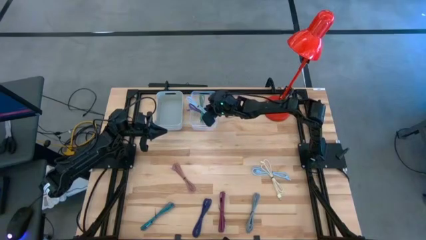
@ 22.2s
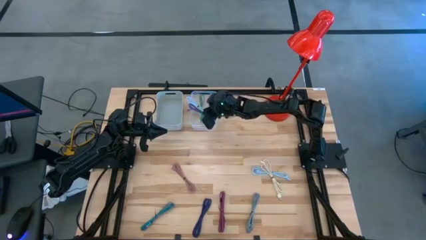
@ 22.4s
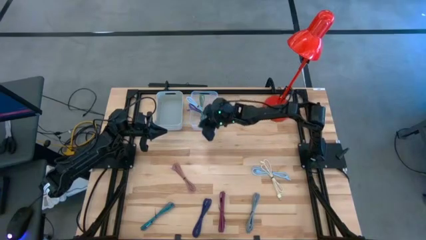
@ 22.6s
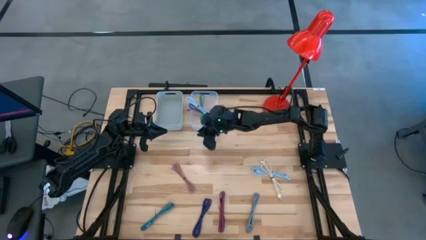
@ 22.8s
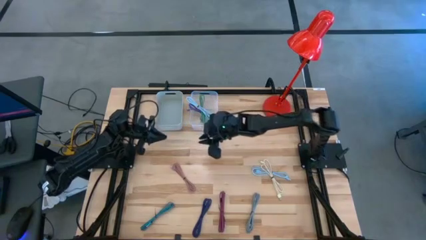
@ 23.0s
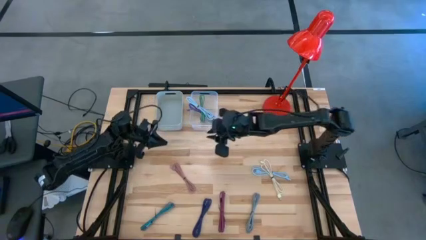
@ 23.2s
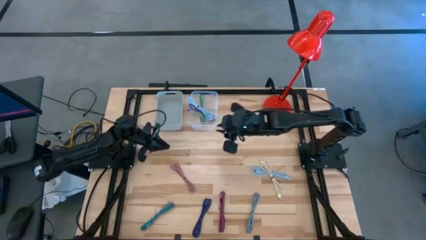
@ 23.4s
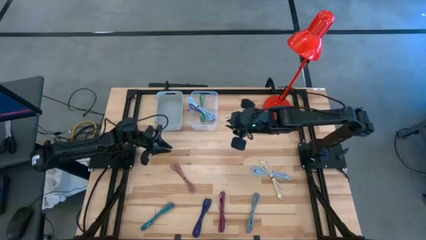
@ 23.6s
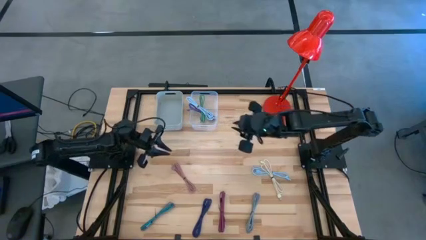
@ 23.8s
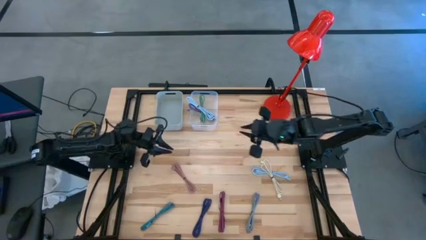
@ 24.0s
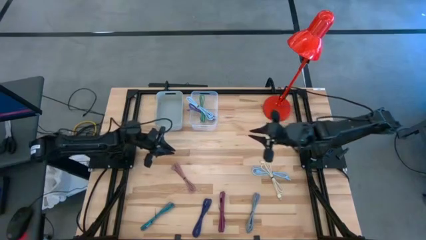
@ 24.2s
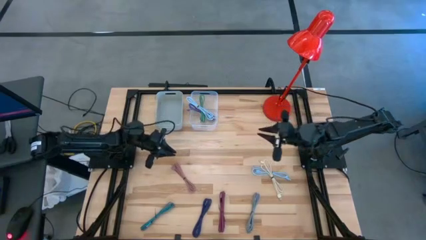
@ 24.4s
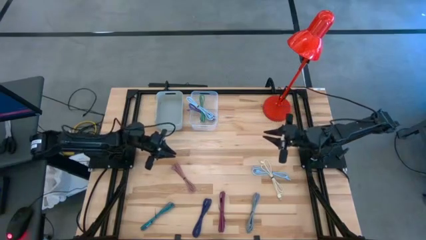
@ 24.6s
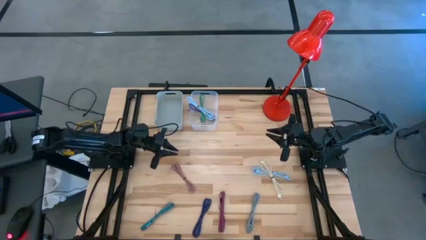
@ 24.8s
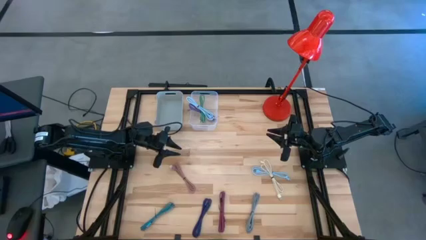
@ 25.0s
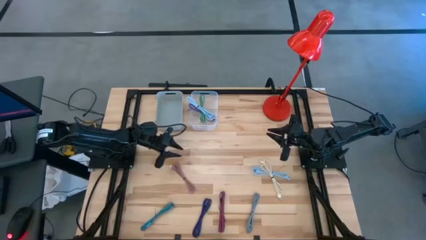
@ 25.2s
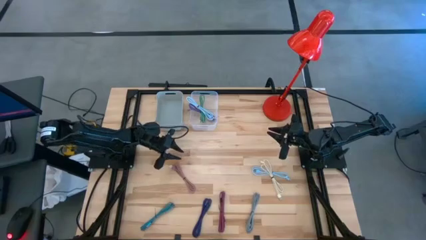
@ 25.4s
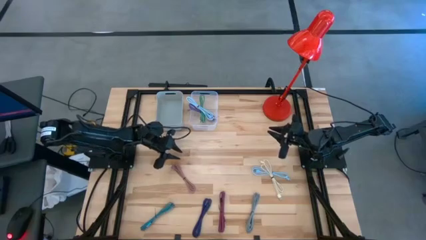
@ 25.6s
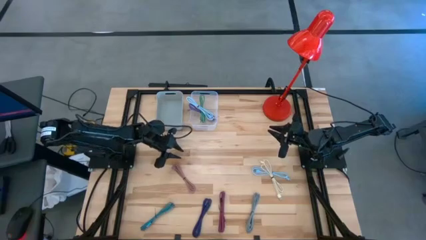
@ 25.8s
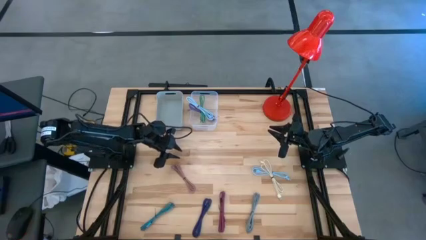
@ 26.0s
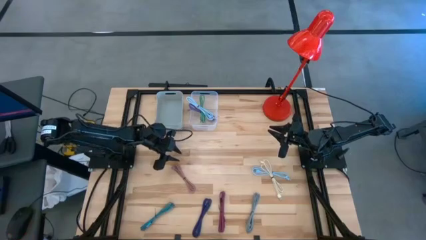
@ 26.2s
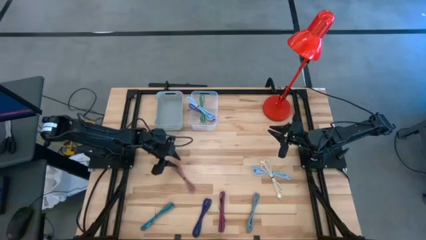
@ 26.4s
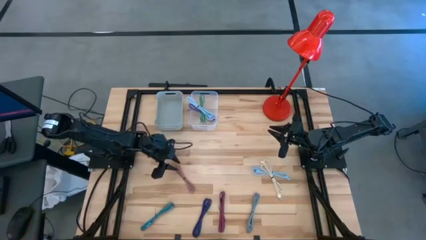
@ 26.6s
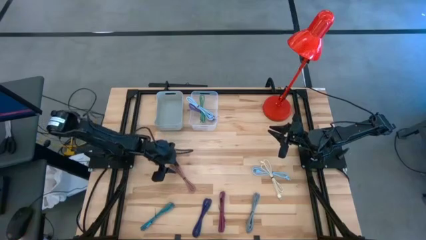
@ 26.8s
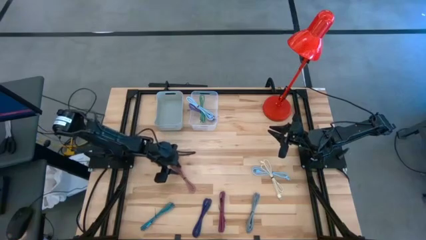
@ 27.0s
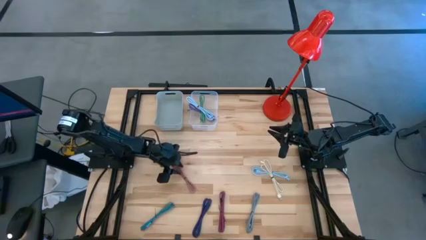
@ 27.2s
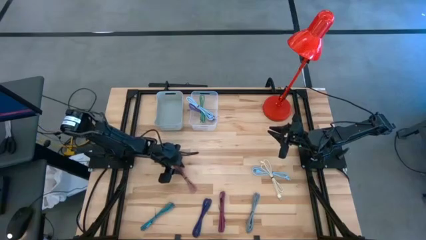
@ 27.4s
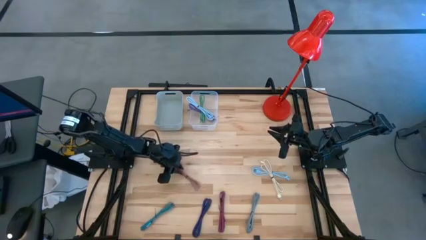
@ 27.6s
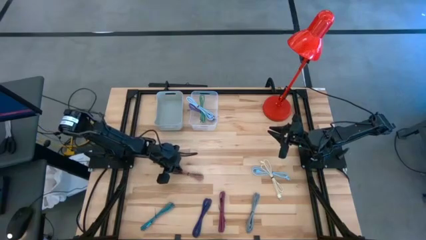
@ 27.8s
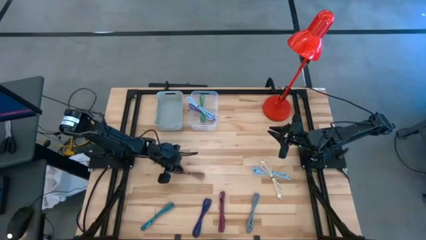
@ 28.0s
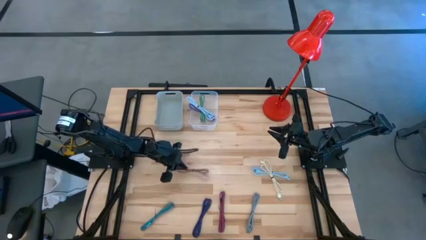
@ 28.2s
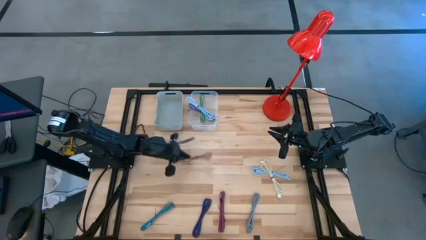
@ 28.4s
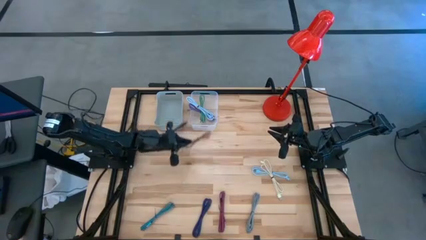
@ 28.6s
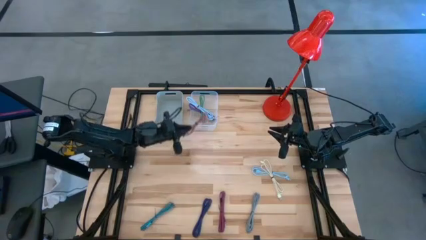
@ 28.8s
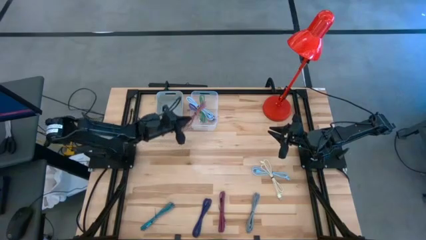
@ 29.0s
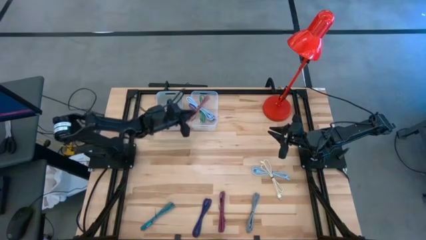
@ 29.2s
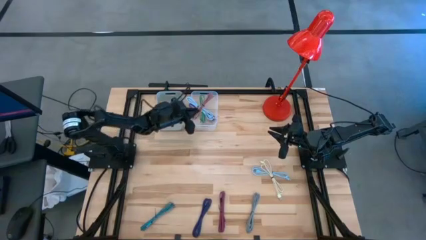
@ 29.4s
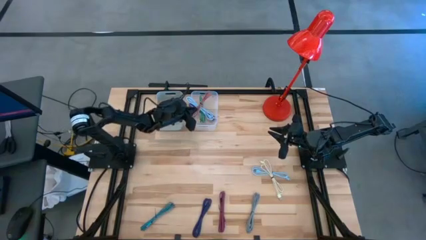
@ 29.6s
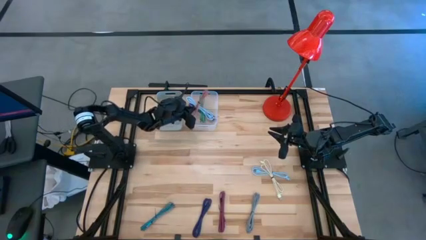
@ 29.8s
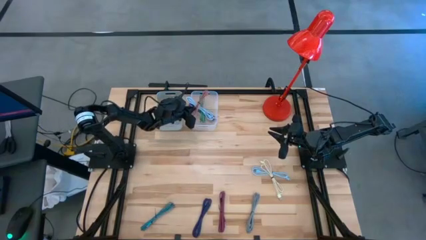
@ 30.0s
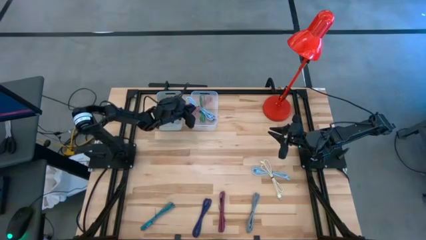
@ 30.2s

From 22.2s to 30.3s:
Task: Pick & Place USB Port
Put the brown charge cable into the transparent bin

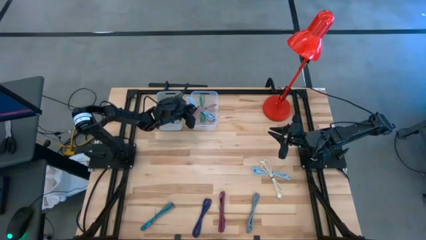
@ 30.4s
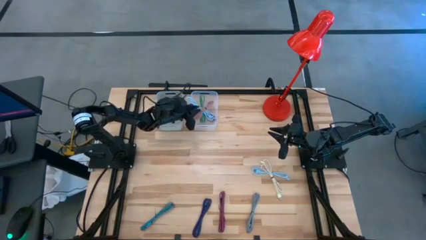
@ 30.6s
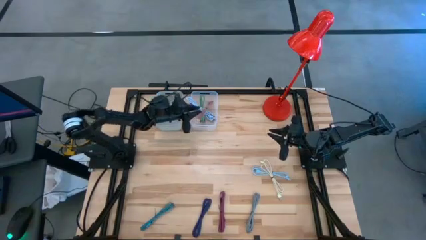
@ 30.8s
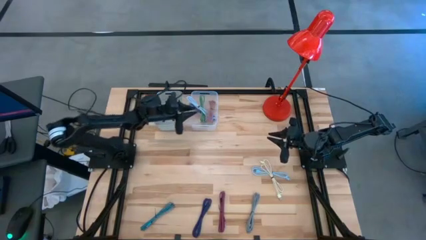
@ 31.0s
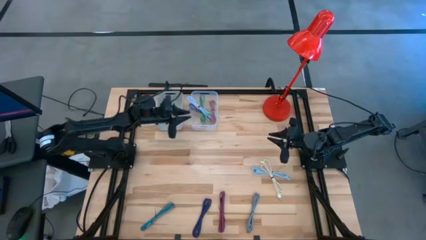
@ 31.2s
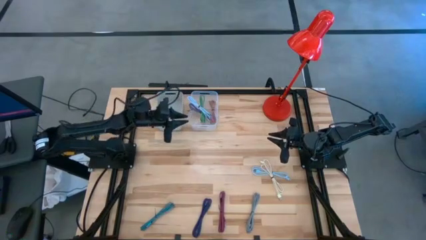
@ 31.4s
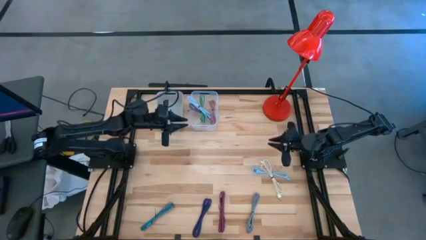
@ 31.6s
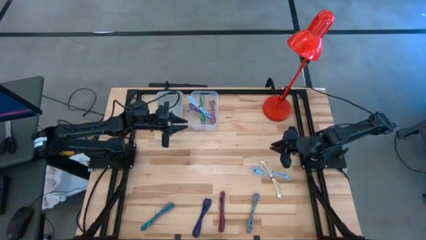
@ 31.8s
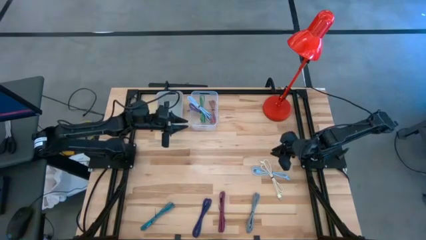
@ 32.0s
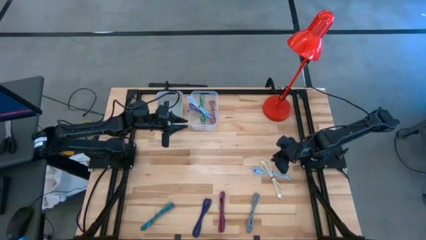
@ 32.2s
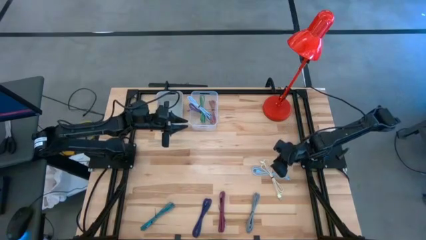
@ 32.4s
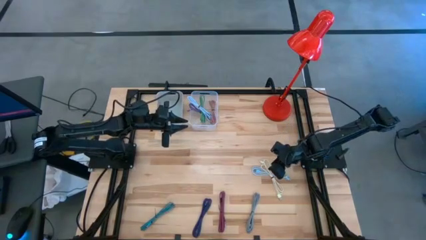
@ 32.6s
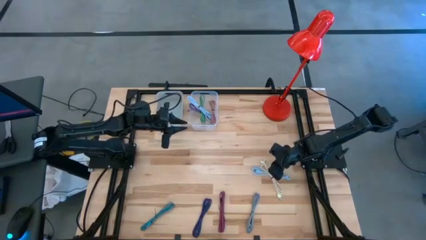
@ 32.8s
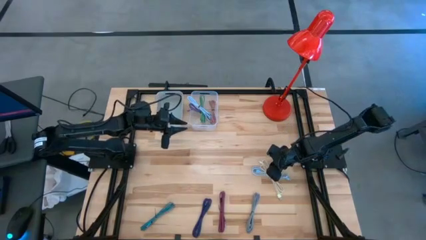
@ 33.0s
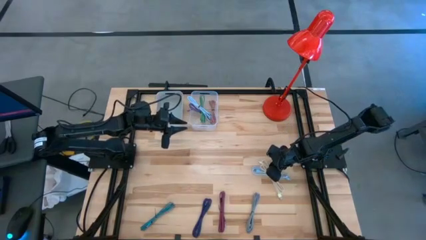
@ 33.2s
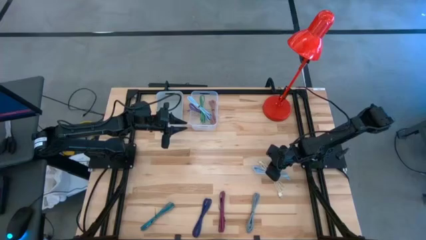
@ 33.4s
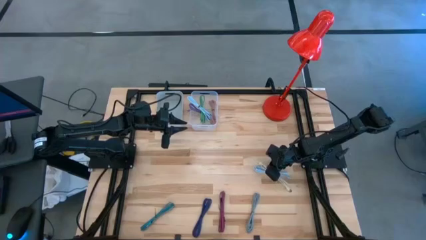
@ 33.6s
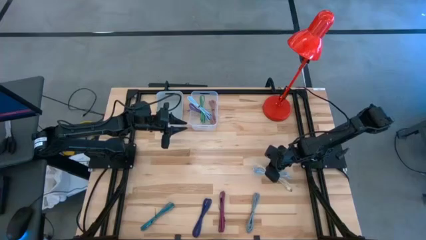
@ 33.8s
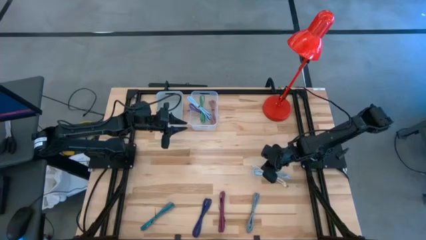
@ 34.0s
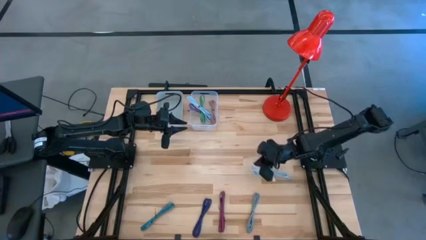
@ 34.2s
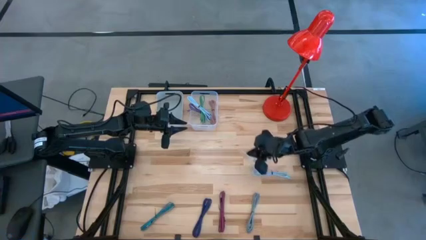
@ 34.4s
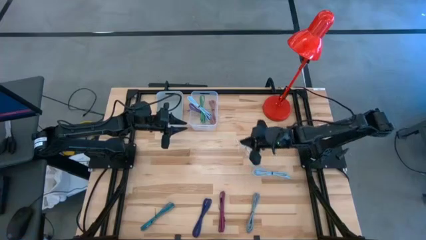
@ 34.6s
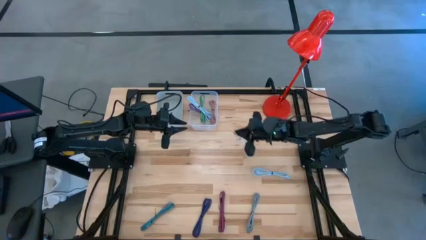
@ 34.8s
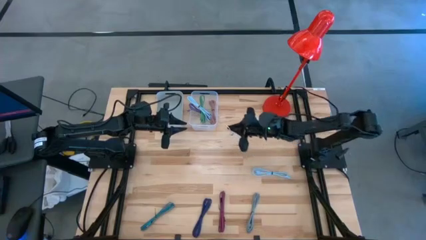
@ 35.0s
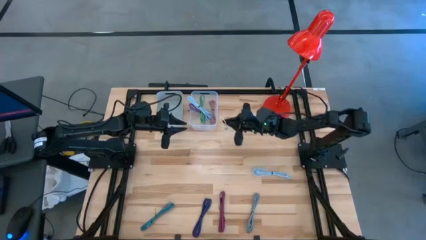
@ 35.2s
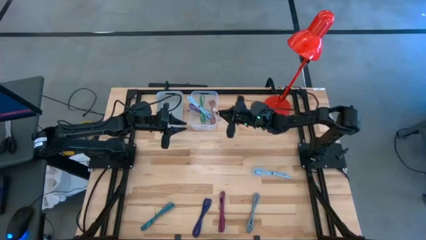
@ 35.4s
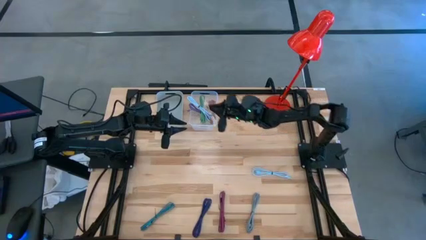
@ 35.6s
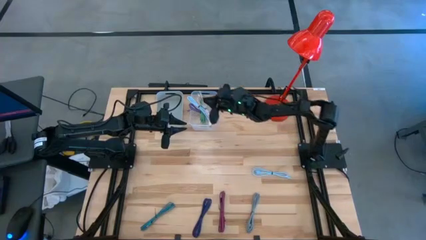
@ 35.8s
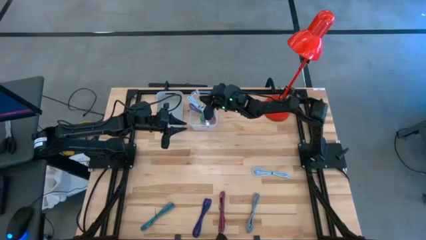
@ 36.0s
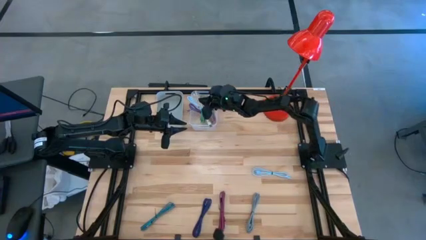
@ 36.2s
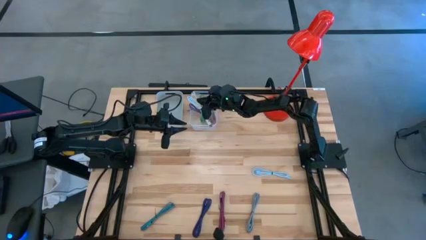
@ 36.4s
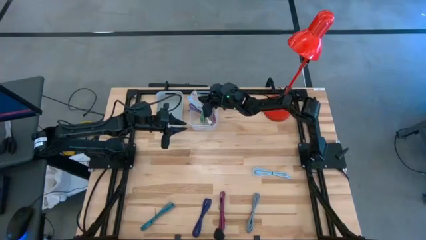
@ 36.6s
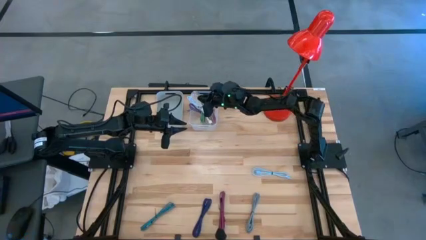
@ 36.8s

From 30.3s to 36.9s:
Put the white charge cable into the transparent bin

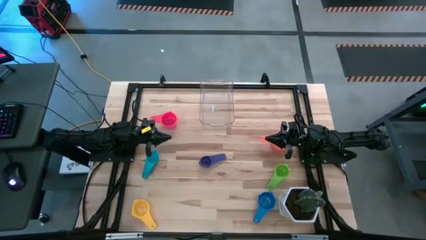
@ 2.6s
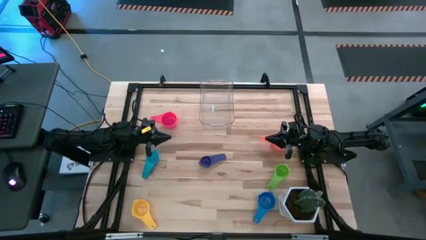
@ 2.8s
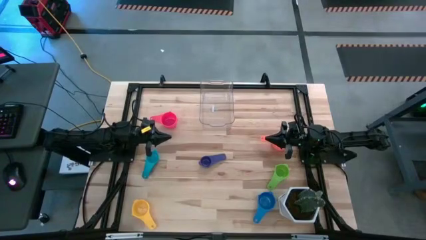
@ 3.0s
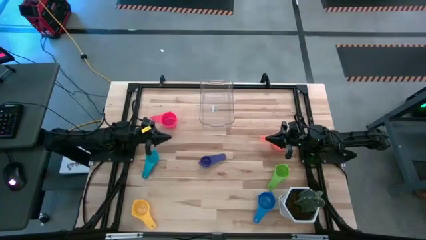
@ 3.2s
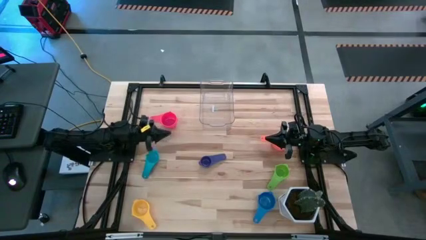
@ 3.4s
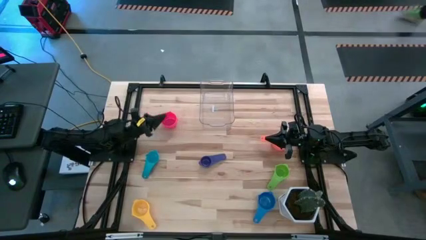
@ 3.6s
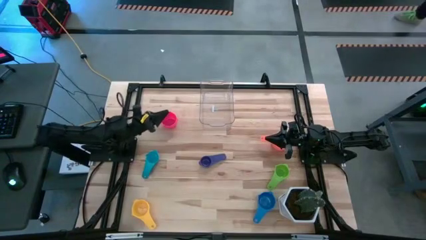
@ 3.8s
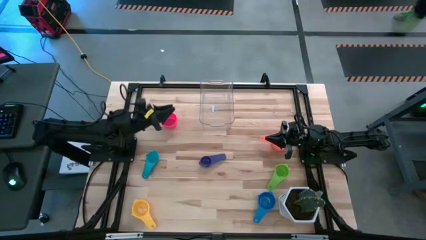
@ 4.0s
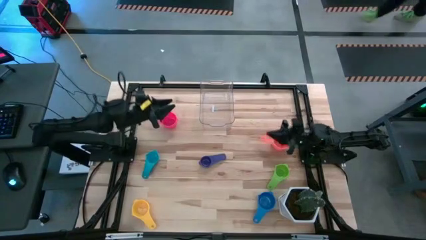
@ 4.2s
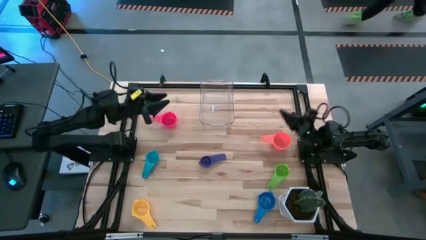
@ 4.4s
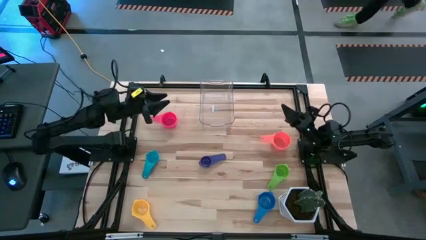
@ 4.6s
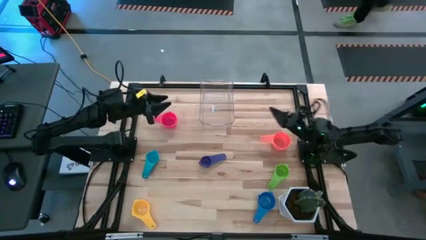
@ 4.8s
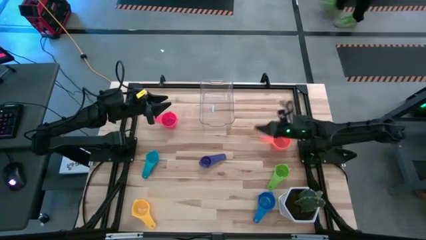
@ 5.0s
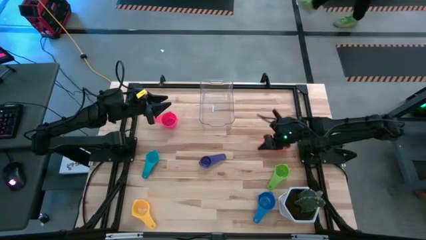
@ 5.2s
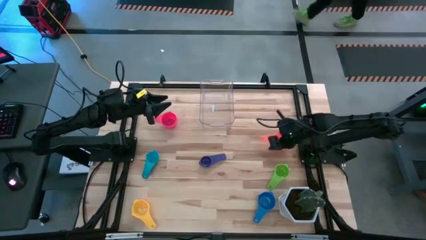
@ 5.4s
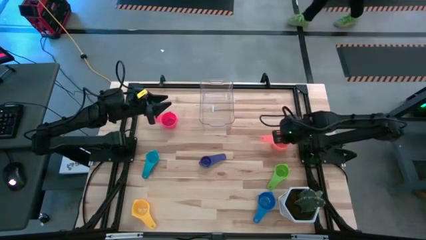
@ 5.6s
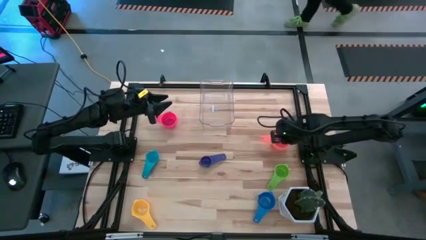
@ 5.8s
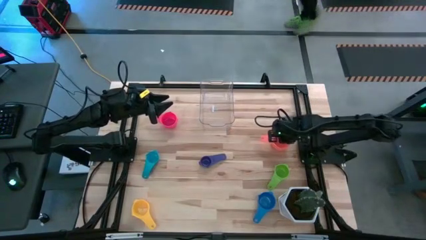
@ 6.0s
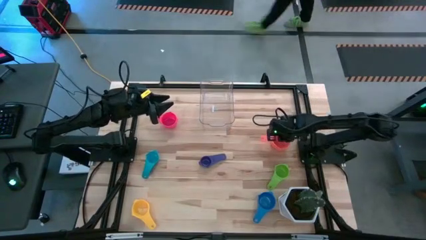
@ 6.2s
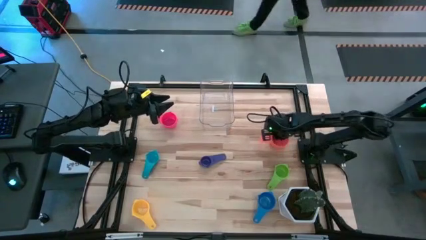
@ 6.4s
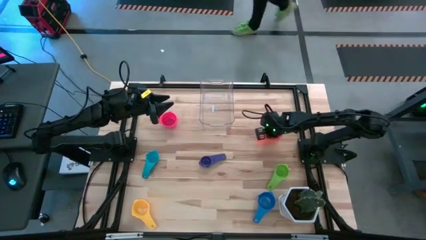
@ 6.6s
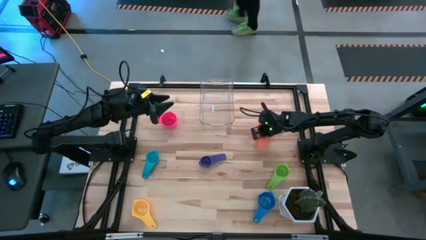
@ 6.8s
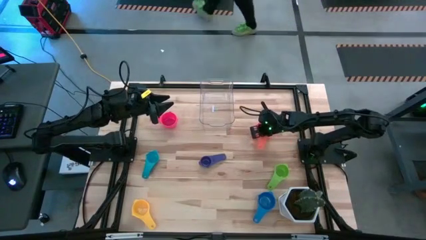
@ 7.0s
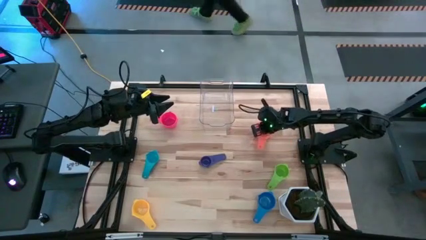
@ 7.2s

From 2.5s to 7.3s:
Task: Nest measuring cups in basket
Adjust the orange measuring cup
